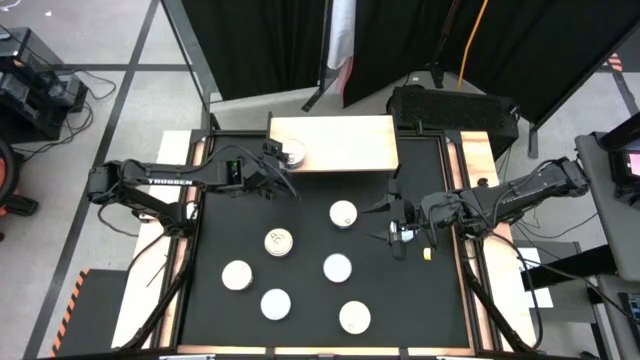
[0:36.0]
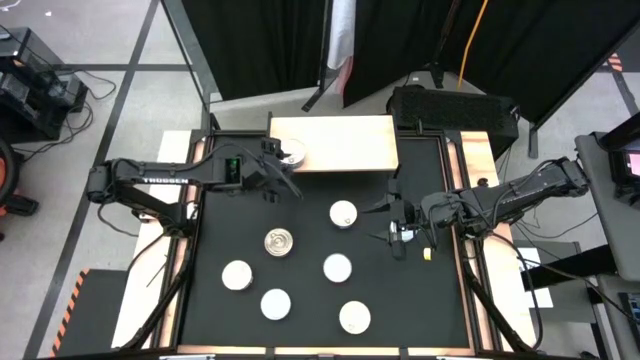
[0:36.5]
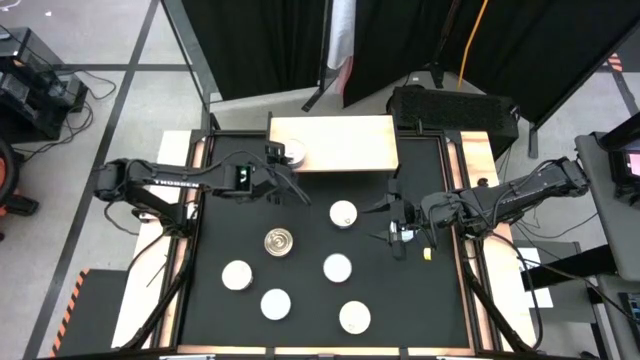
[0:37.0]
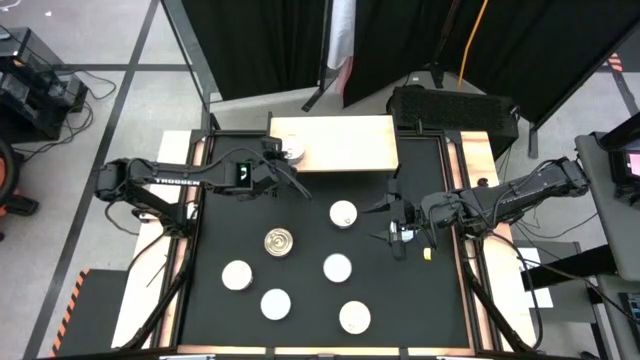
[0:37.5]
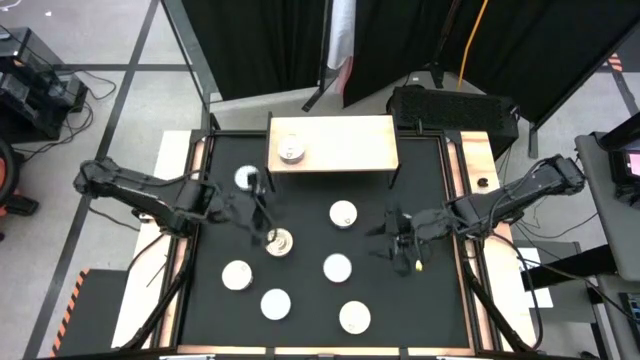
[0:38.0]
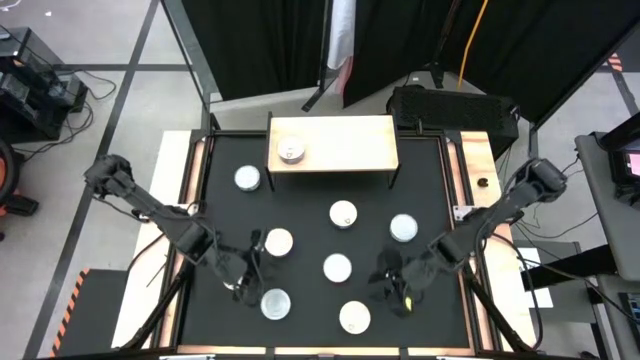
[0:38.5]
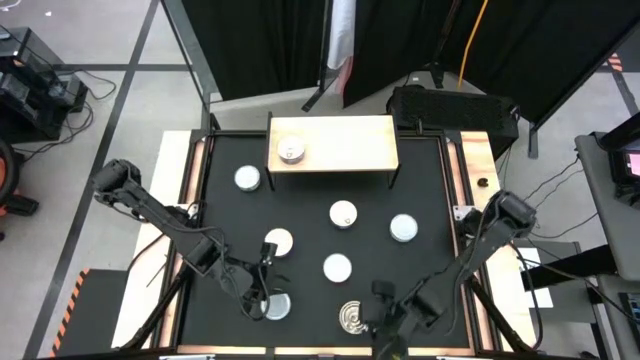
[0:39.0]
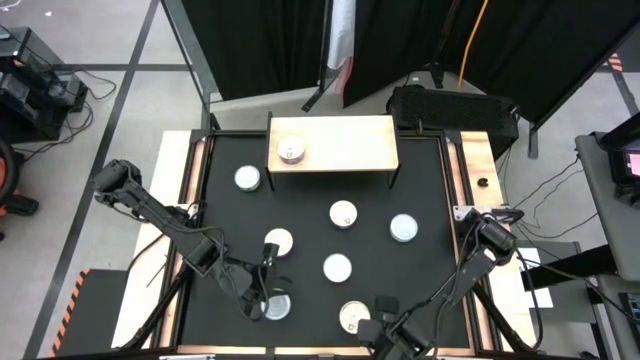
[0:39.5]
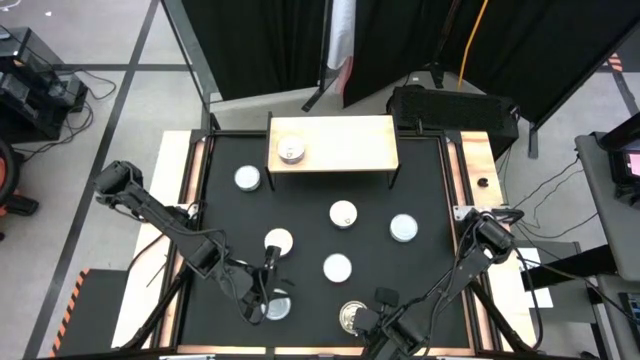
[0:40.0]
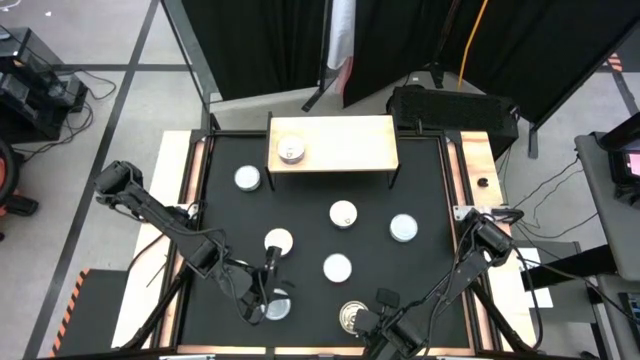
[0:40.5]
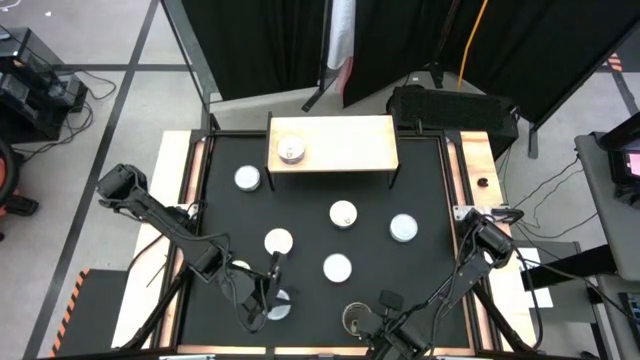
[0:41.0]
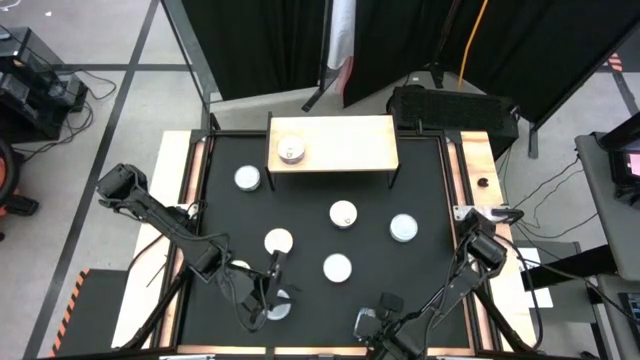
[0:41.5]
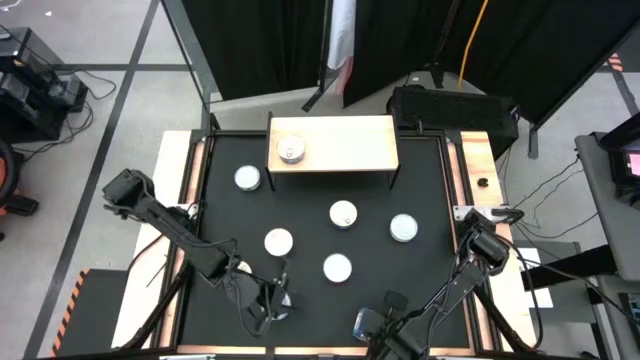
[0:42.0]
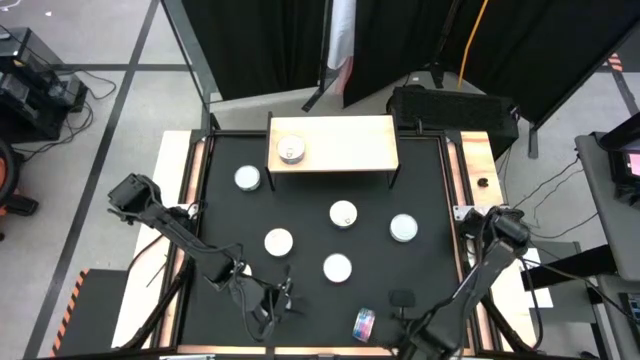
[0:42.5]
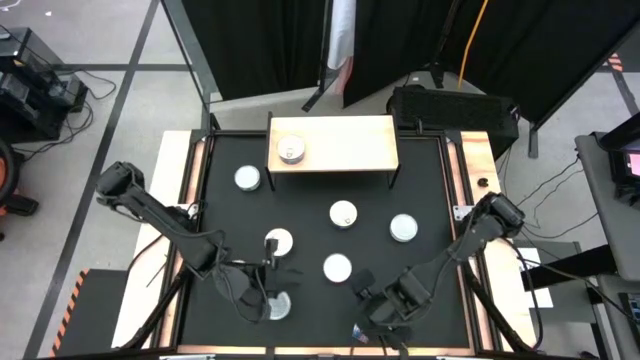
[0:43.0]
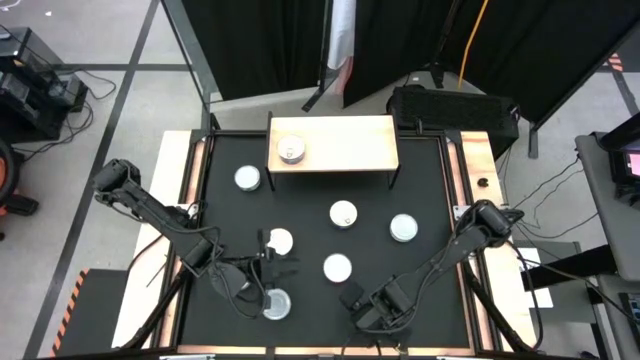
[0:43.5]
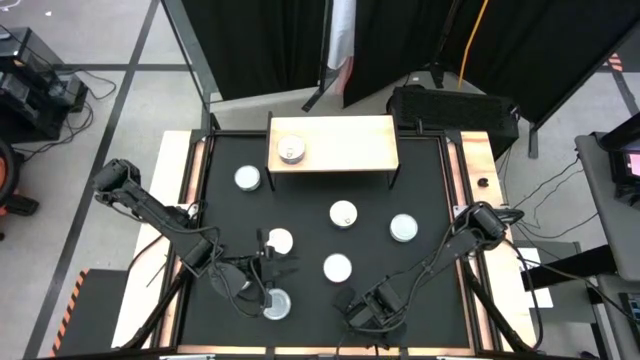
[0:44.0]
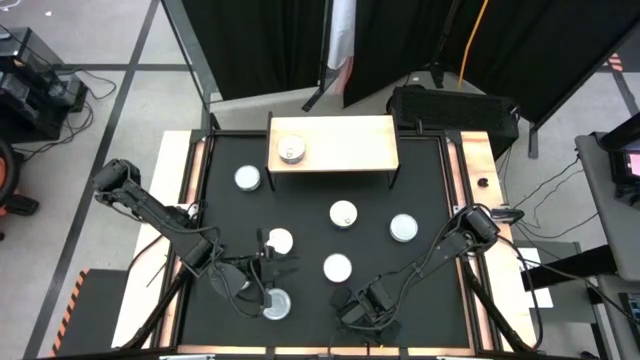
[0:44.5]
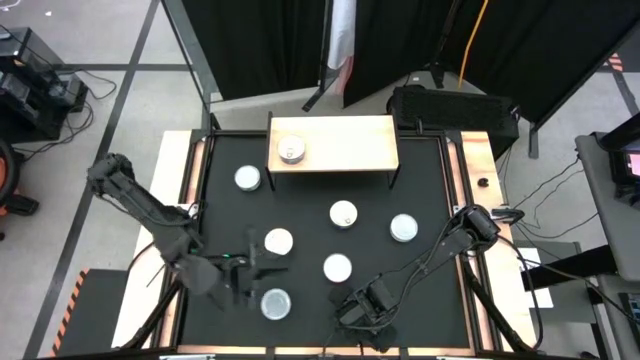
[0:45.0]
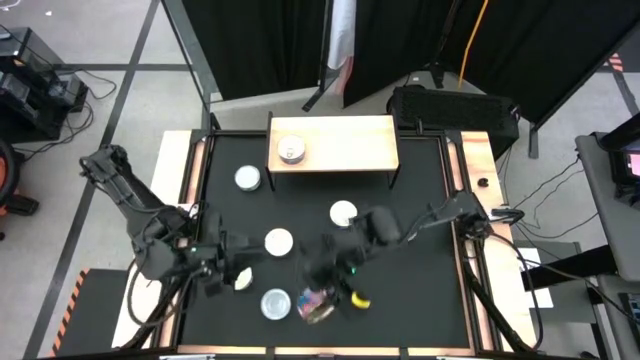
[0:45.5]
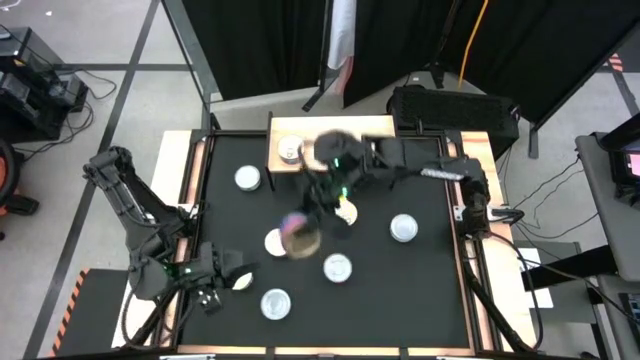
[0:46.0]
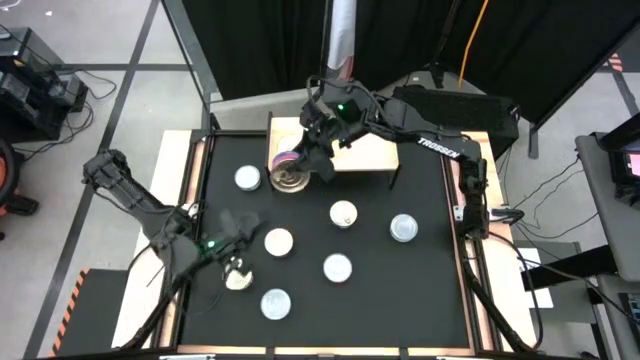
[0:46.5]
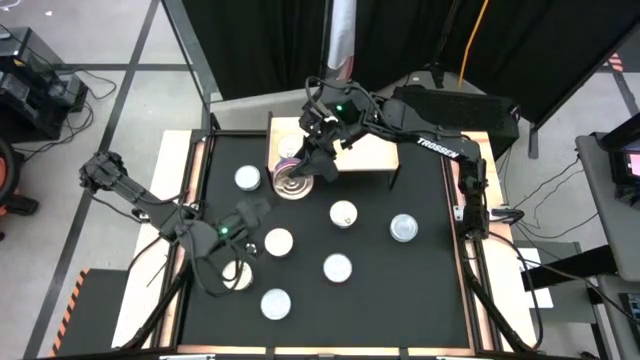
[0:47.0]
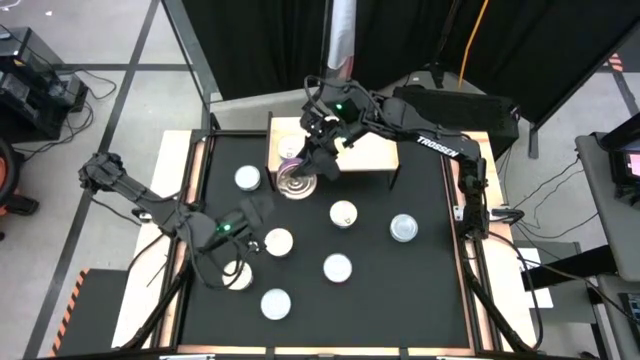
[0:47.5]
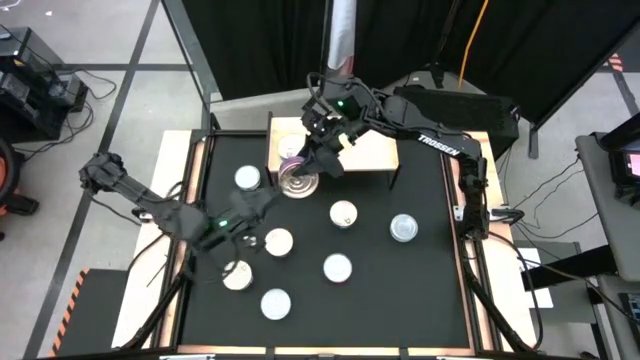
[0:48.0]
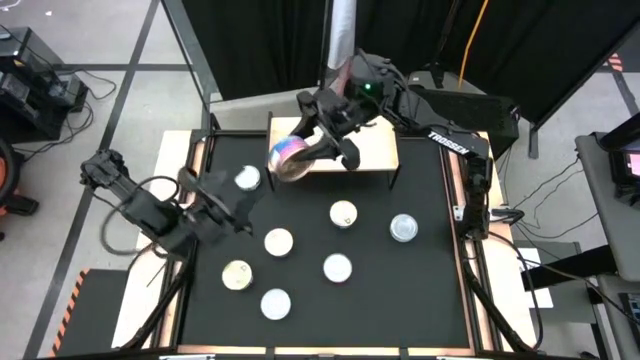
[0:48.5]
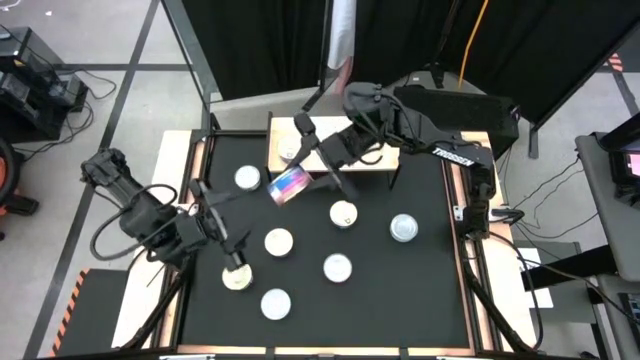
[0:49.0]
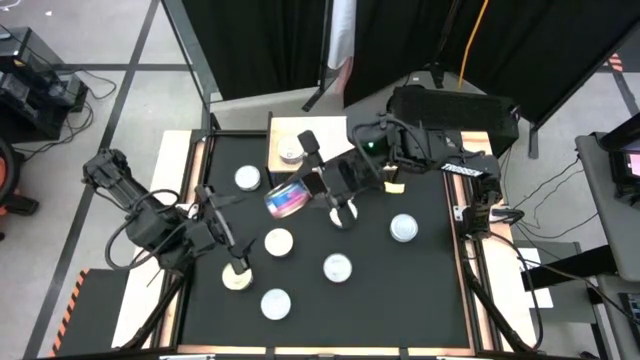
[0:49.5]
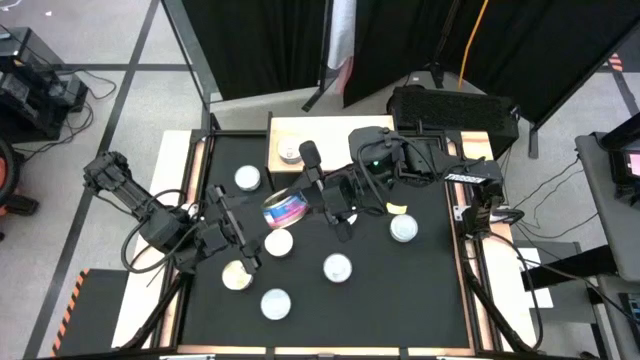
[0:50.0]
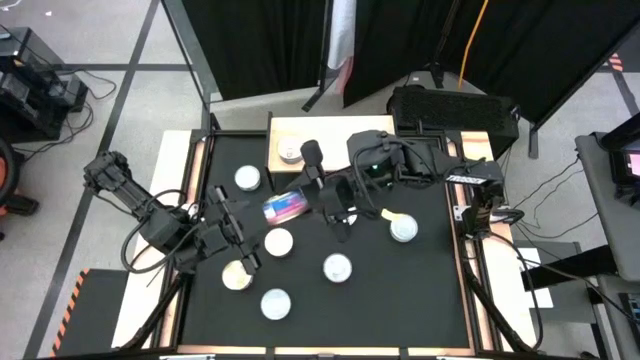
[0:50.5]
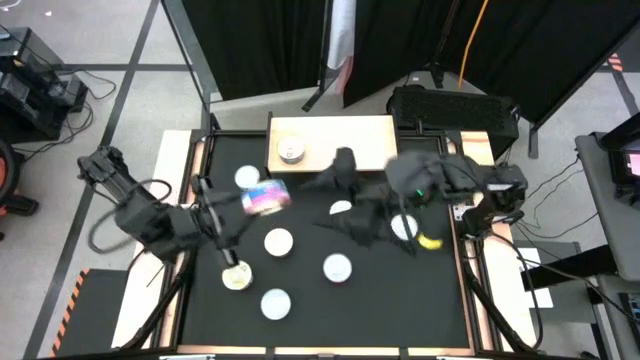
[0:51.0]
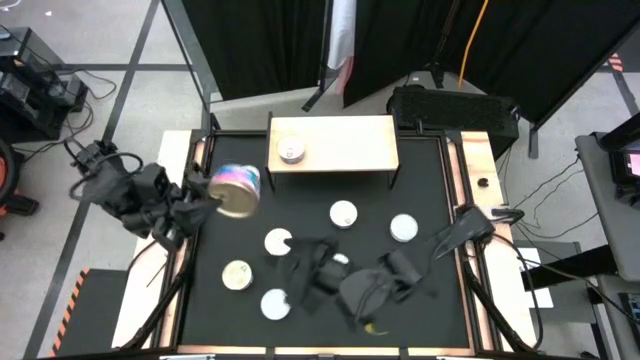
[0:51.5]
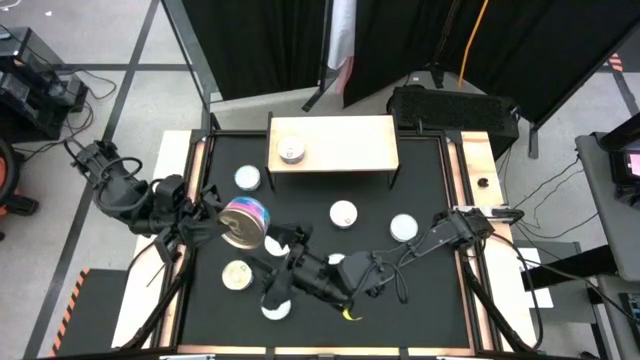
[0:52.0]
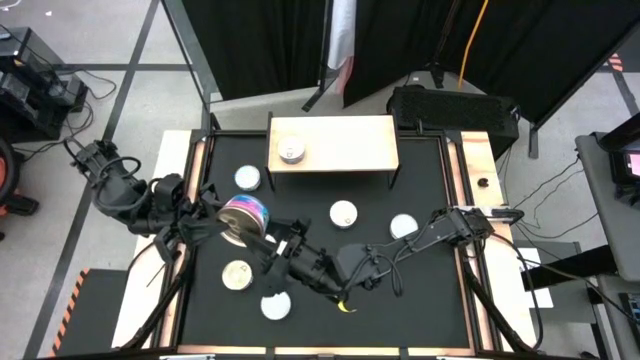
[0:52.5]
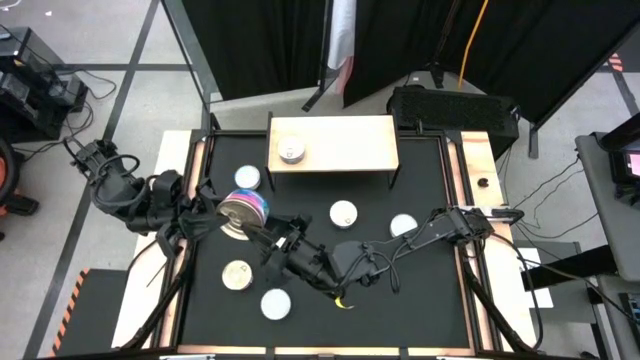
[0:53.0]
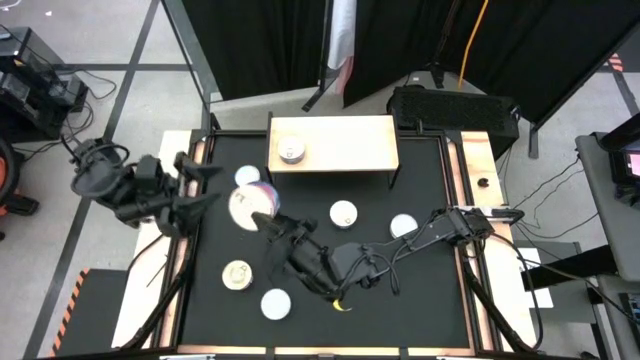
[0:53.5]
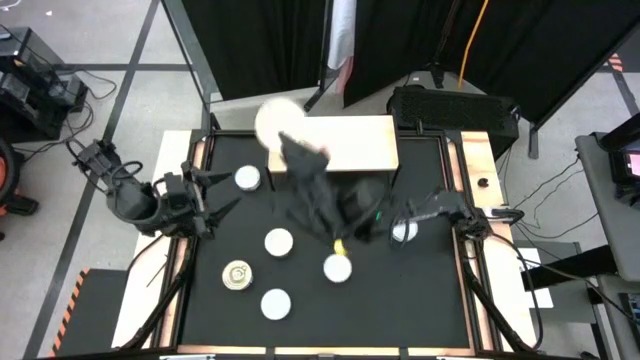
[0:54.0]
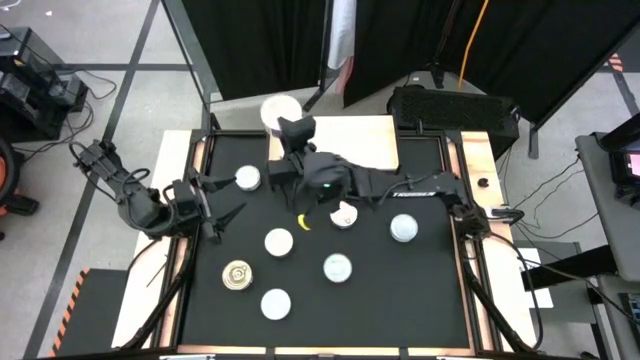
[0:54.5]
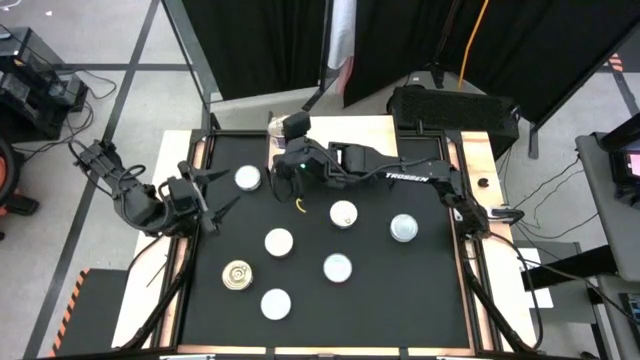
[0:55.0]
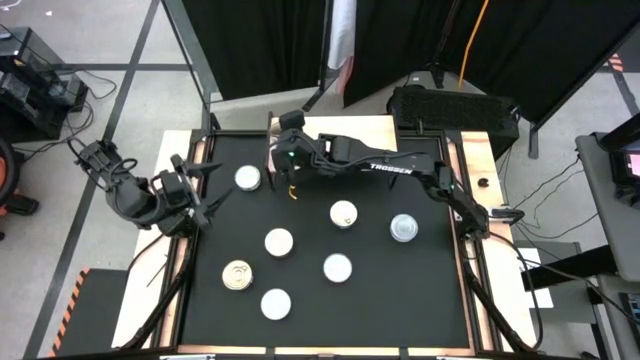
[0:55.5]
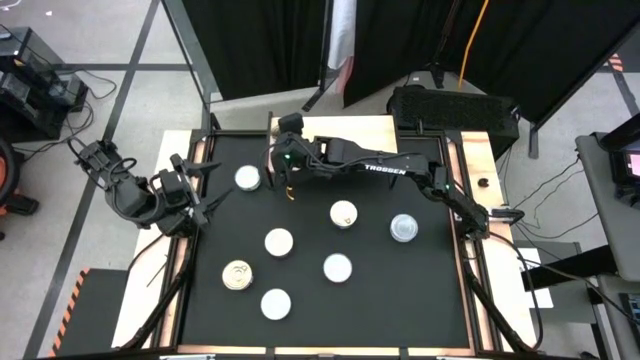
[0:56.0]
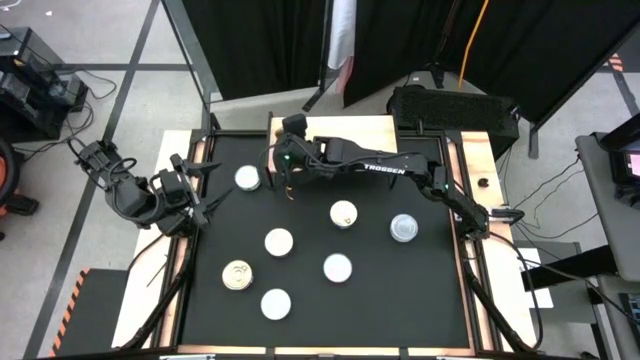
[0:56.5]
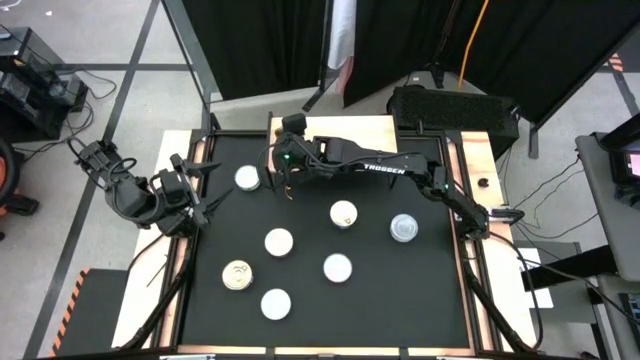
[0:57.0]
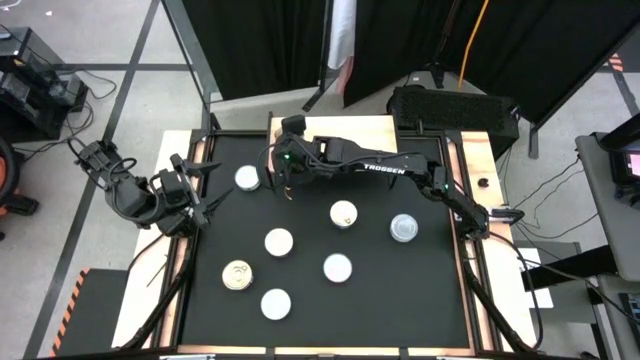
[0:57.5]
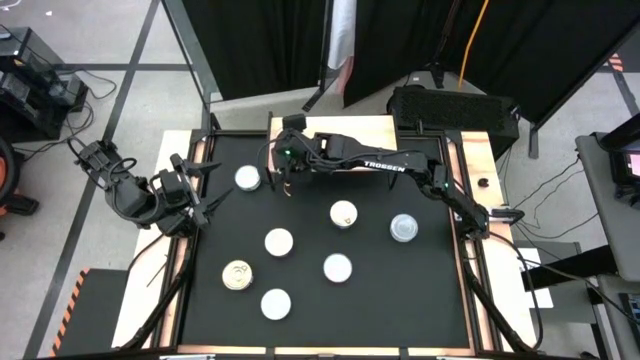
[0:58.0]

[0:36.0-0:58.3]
Task: Stack canned seafood by type on shelf
Stack the blue pink tuna can on top of the other blue pink tuna can on the shelf
